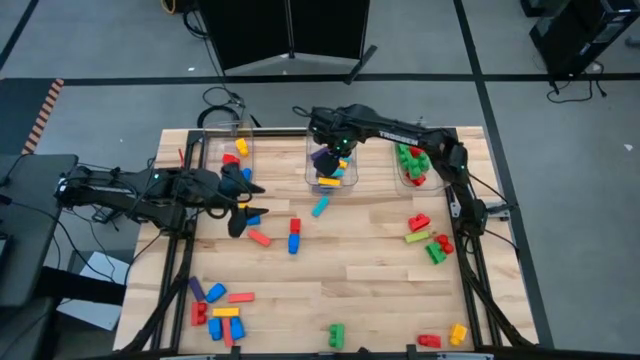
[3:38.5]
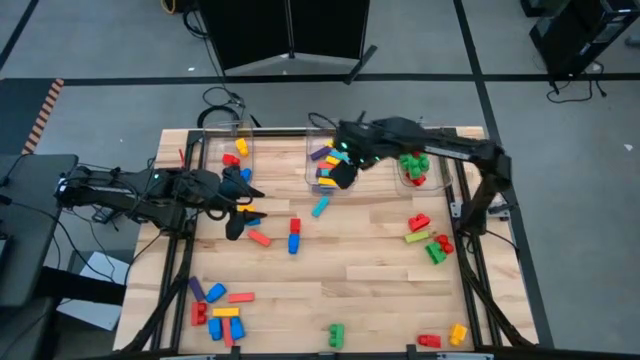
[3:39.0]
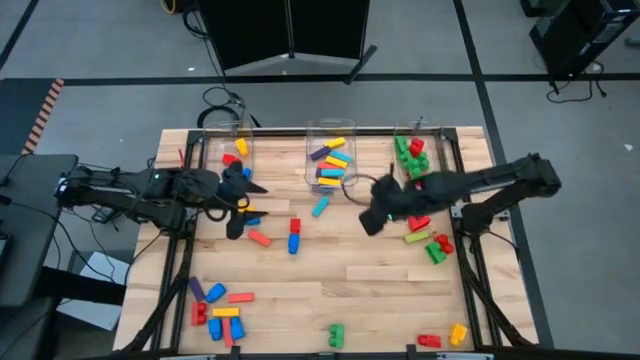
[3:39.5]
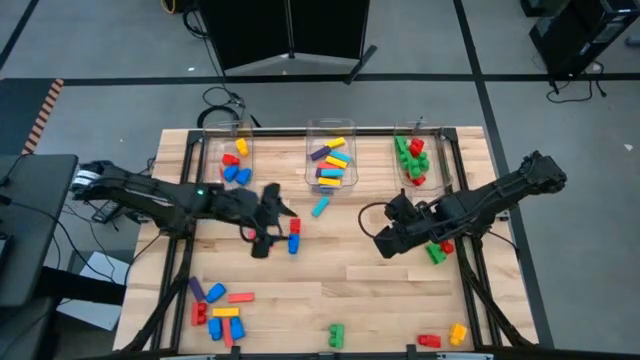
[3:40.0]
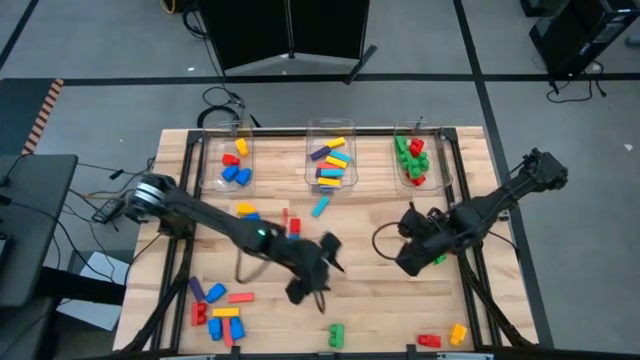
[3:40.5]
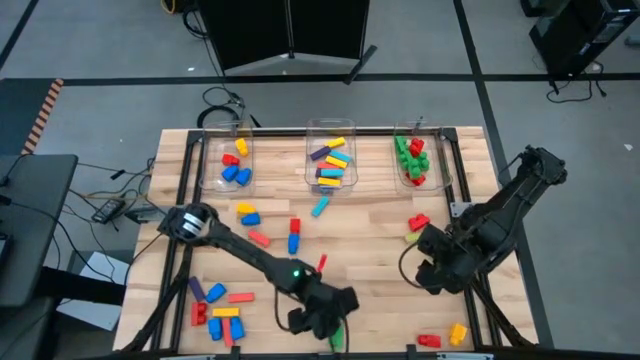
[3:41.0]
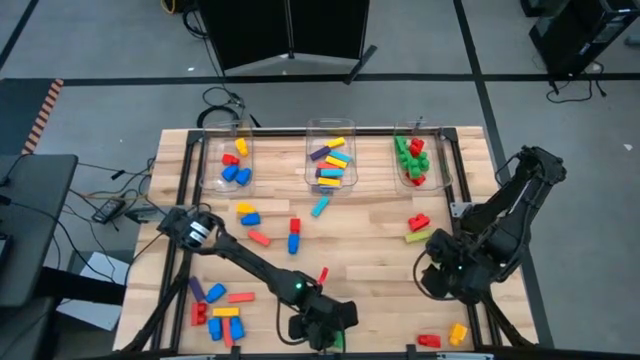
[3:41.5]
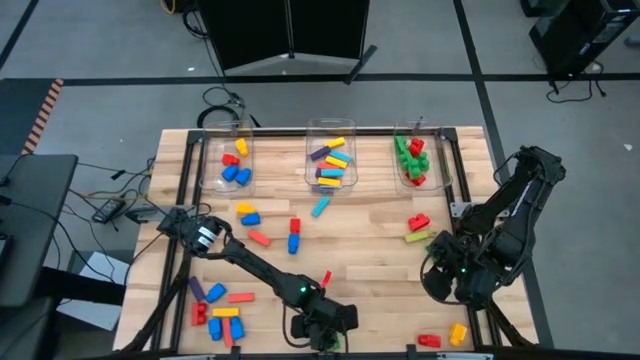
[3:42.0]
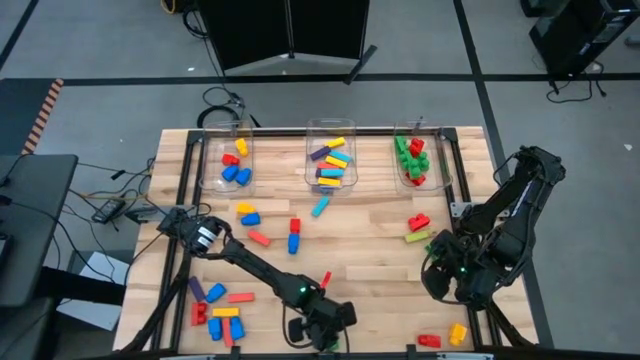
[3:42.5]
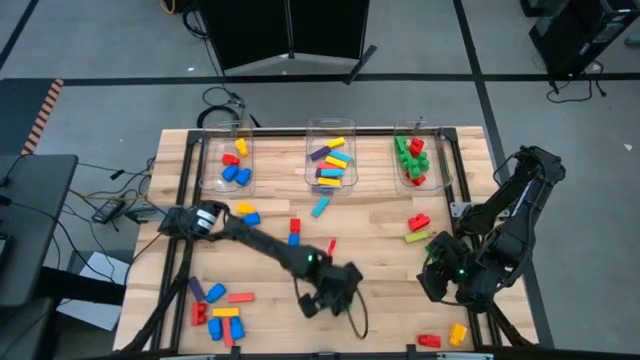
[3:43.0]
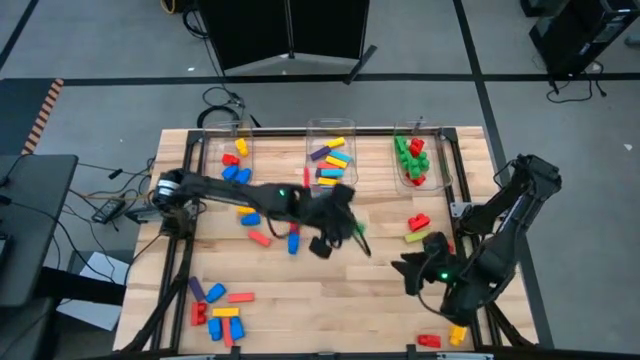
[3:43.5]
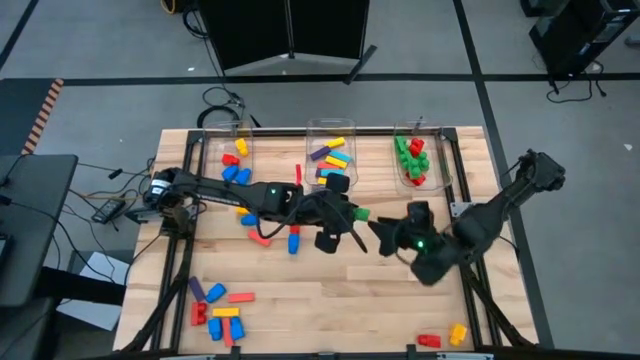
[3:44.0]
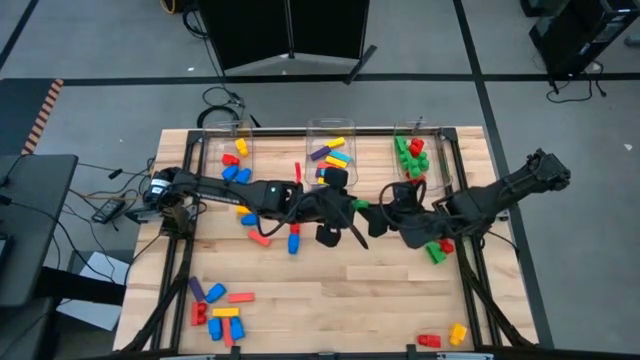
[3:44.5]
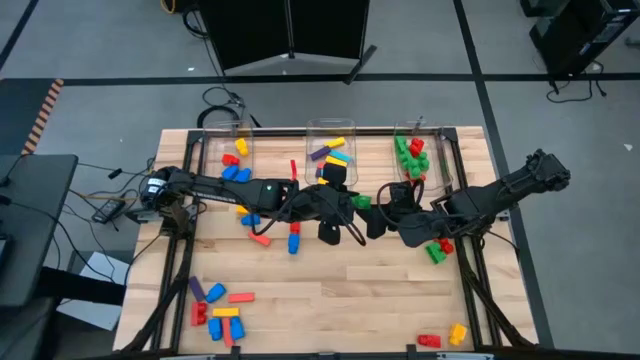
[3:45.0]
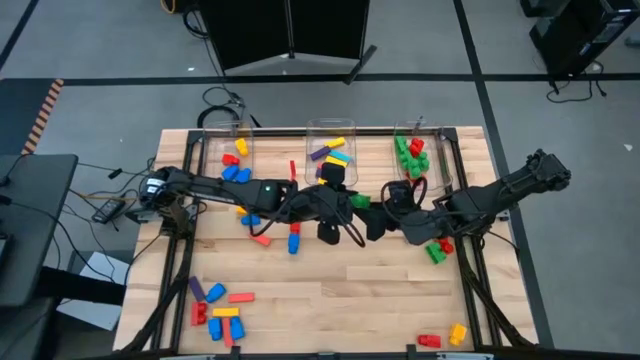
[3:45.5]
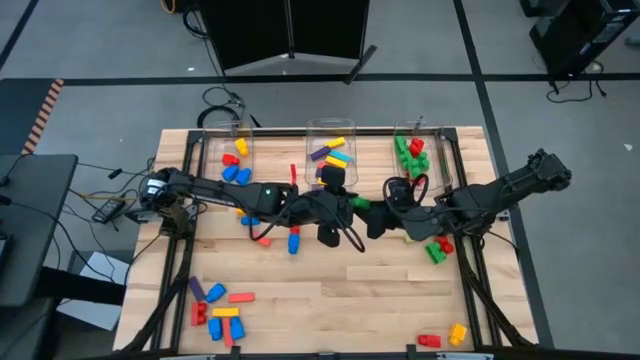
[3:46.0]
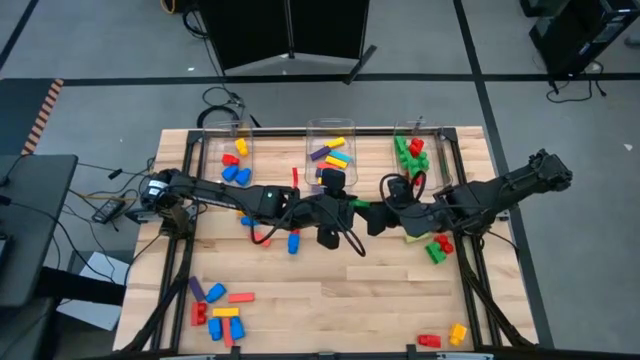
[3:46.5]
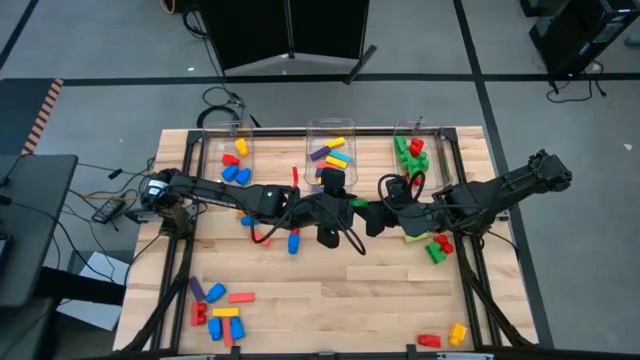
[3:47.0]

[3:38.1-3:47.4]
Task: Sort blocks by size
Put the green 2 stud game piece into the right transparent bin

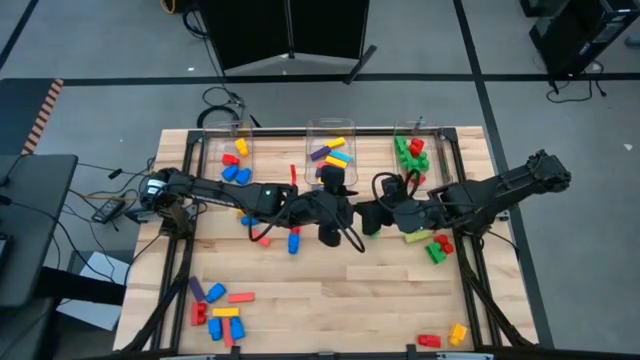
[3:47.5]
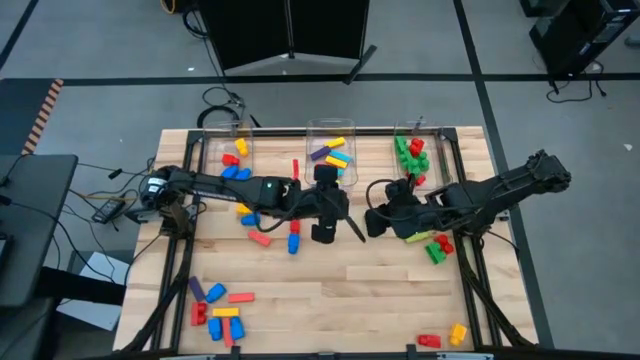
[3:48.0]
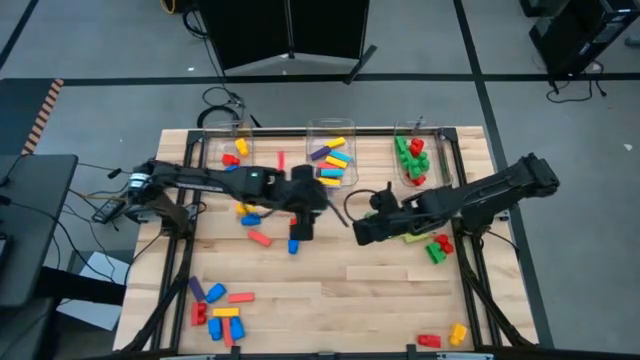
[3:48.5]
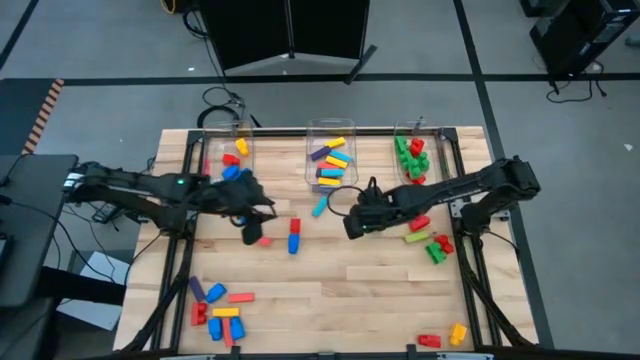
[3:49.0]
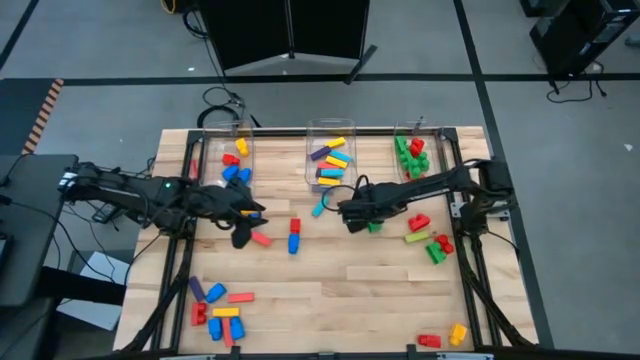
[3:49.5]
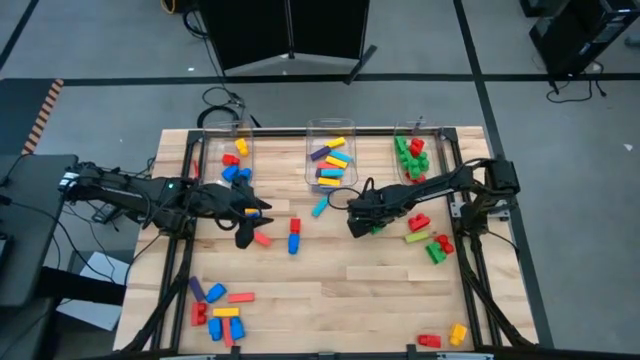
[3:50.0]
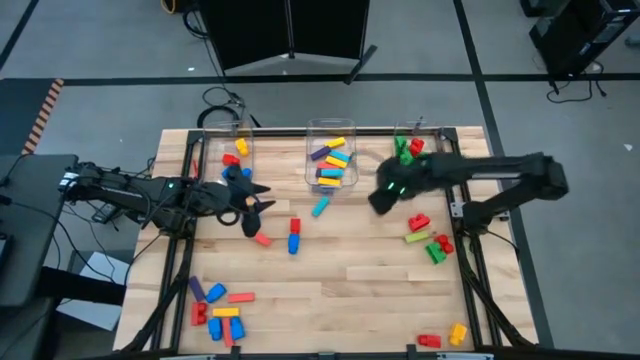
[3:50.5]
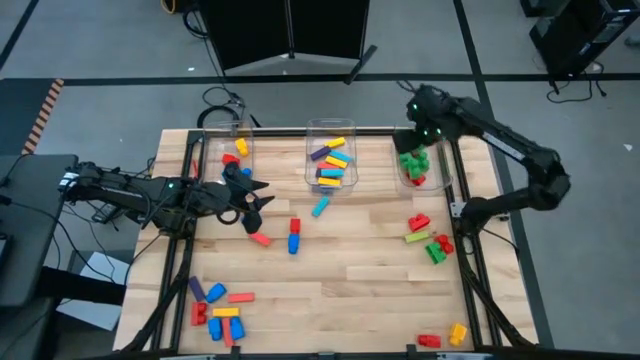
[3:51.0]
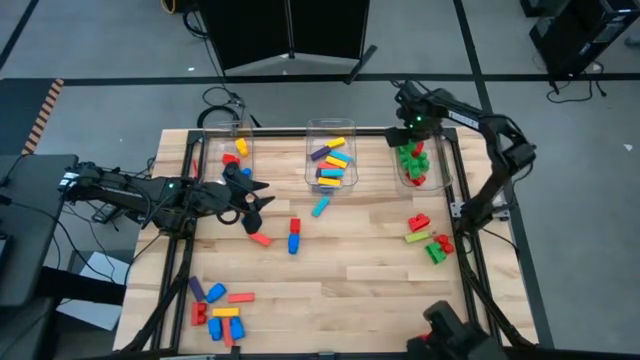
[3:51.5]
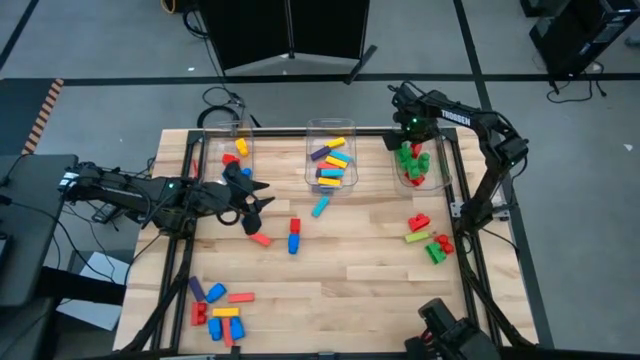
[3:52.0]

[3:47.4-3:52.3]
Put the green 2 stud game piece into the right transparent bin

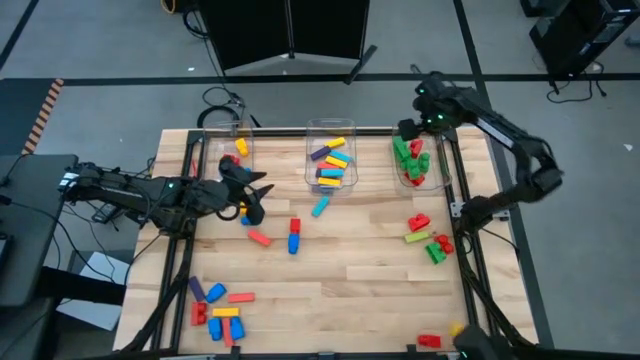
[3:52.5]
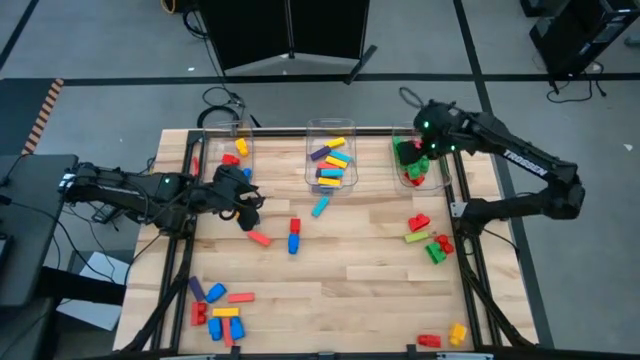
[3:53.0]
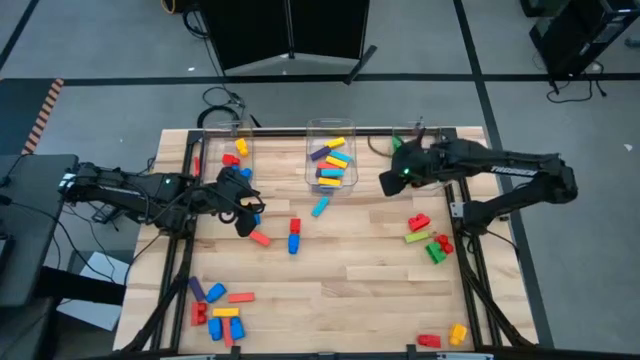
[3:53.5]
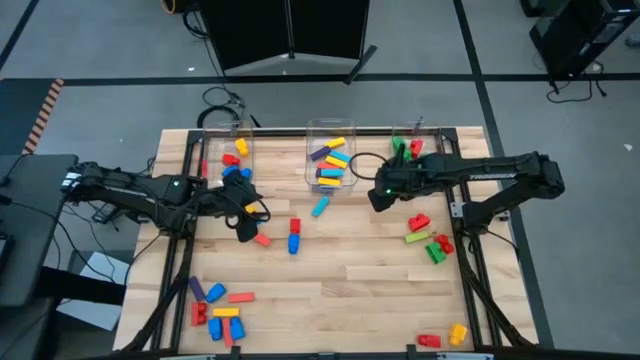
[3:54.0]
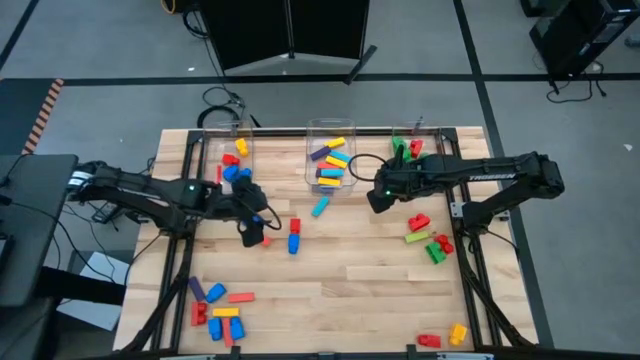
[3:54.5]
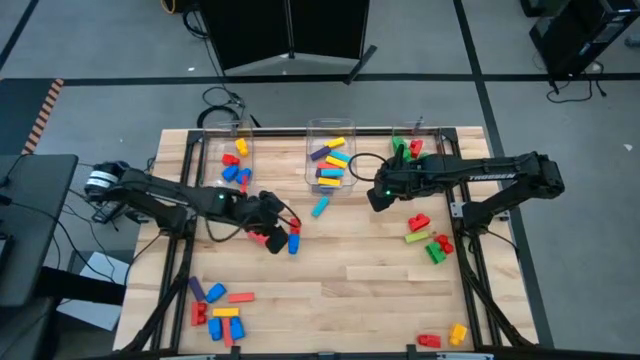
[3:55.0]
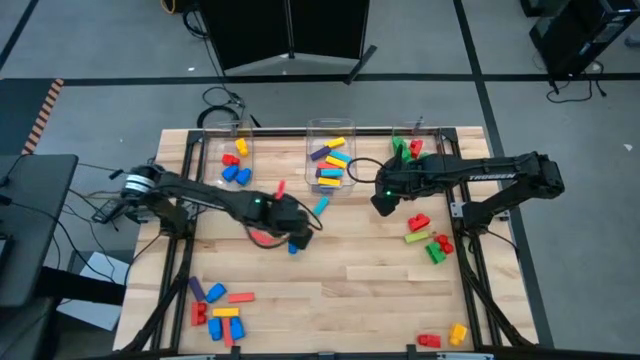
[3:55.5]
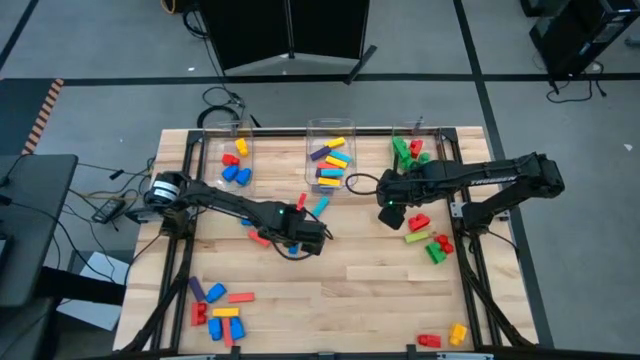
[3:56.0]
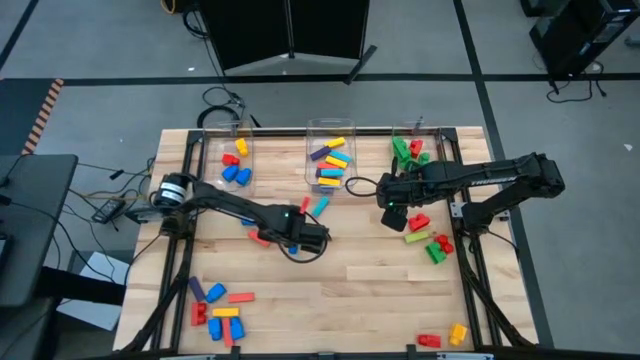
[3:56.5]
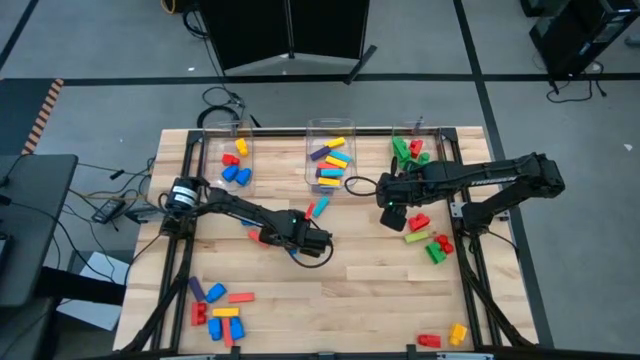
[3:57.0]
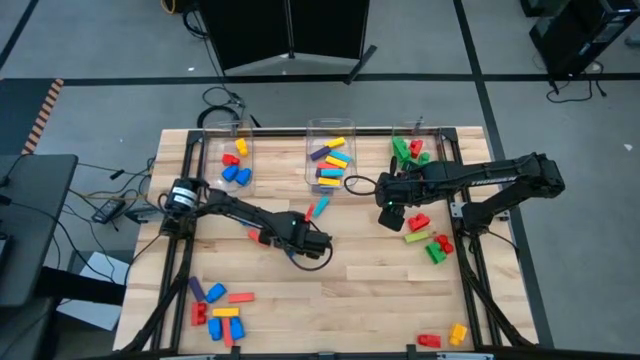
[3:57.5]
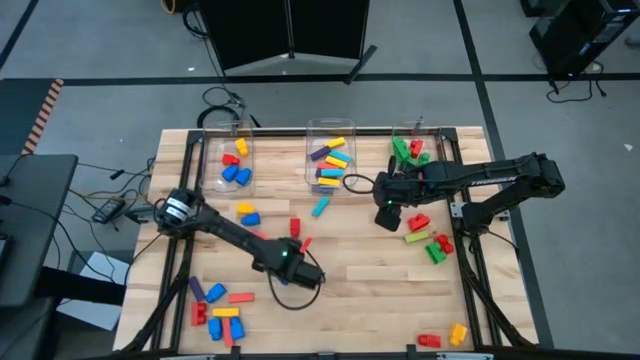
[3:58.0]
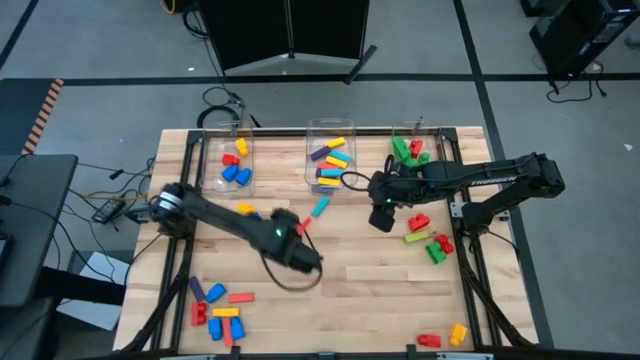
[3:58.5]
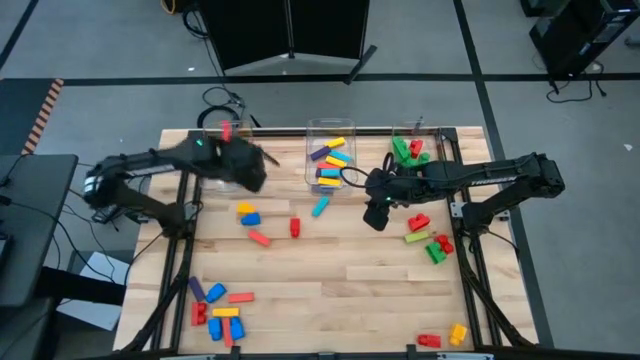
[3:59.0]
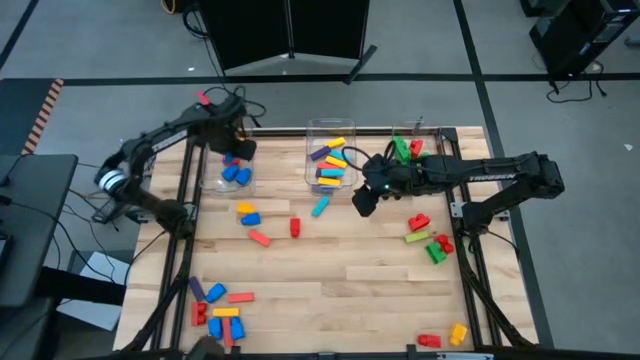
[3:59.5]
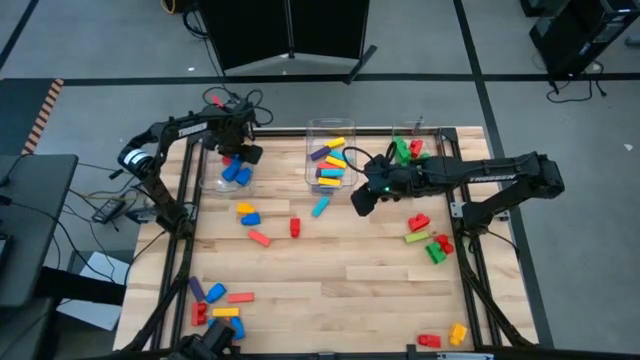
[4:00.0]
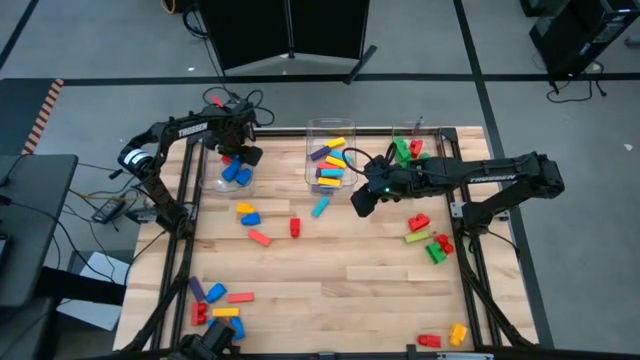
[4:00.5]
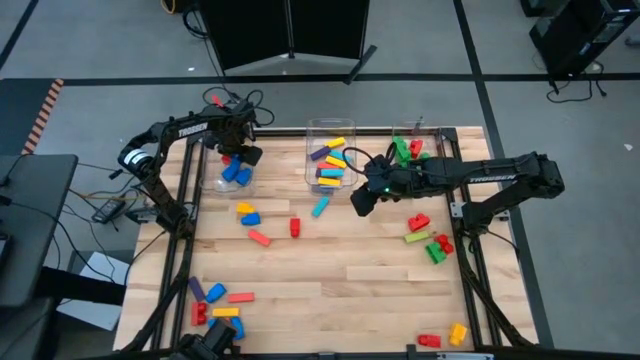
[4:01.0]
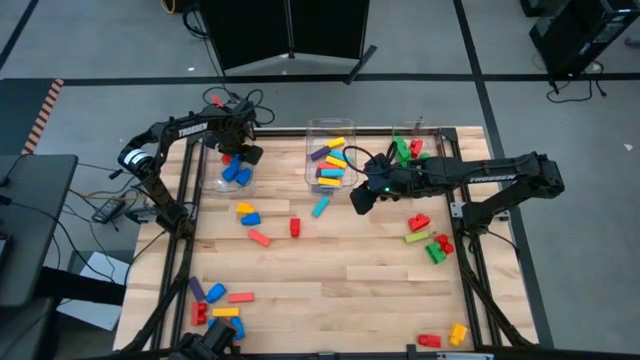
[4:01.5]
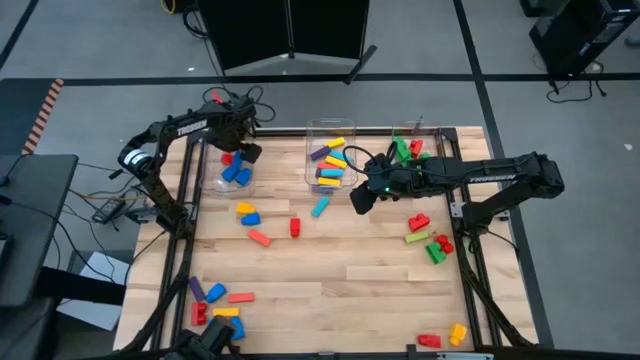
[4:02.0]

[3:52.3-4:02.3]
Put the blue 1 stud game piece into the left transparent bin
